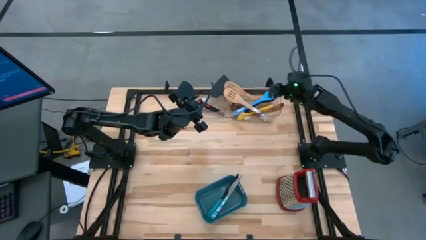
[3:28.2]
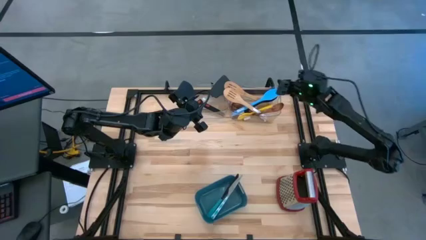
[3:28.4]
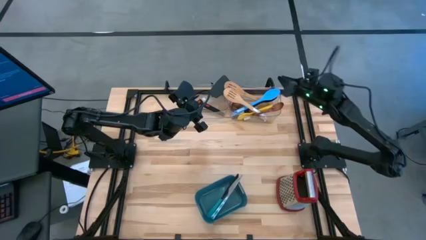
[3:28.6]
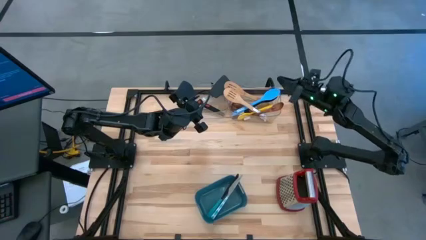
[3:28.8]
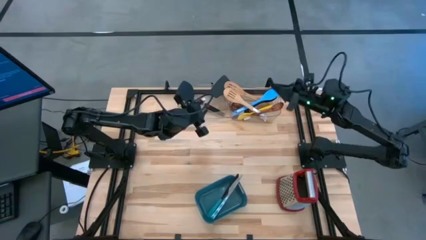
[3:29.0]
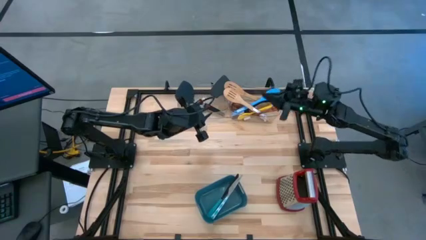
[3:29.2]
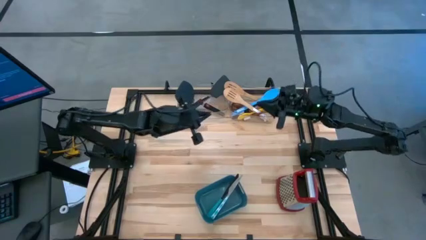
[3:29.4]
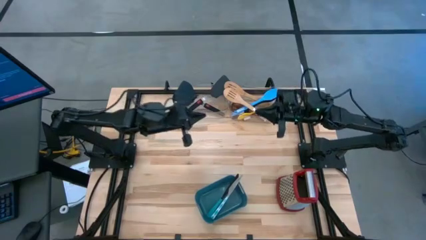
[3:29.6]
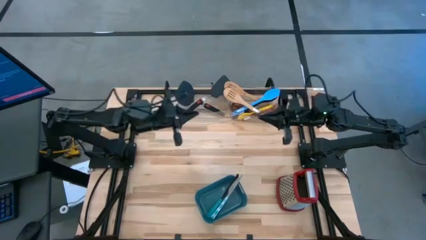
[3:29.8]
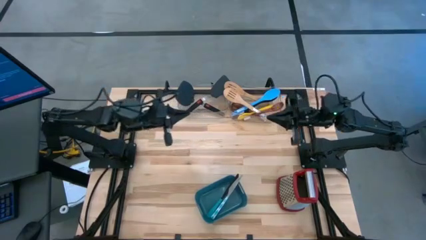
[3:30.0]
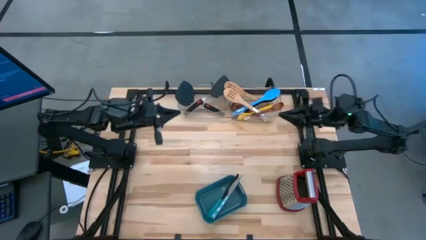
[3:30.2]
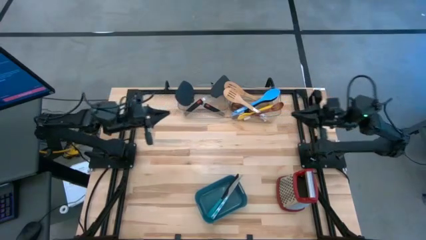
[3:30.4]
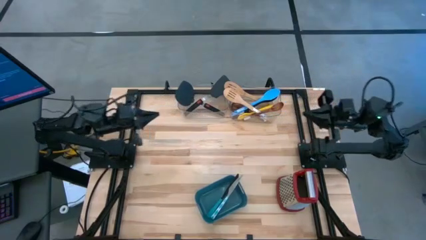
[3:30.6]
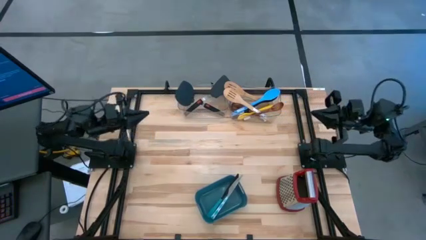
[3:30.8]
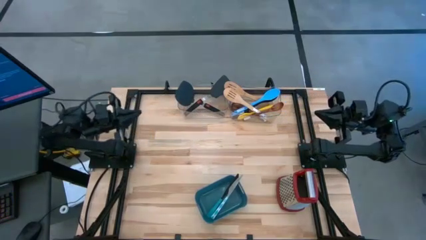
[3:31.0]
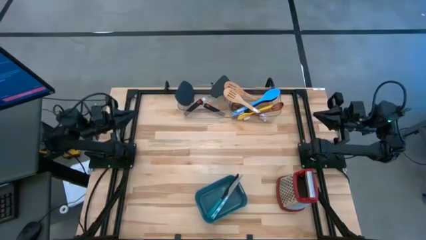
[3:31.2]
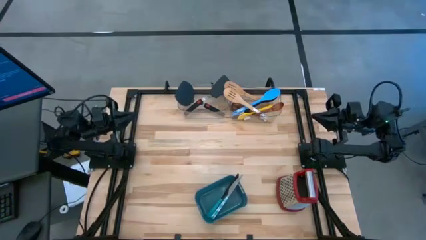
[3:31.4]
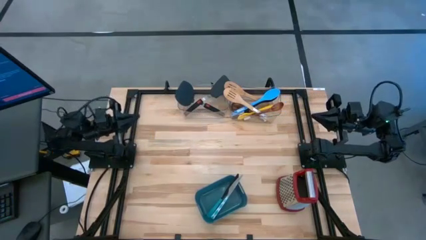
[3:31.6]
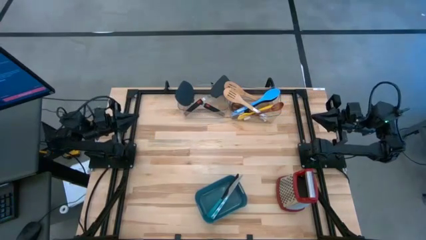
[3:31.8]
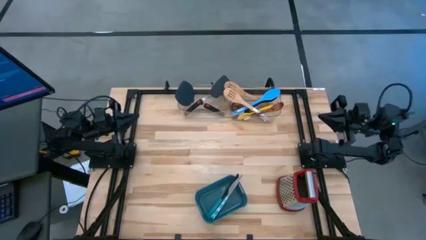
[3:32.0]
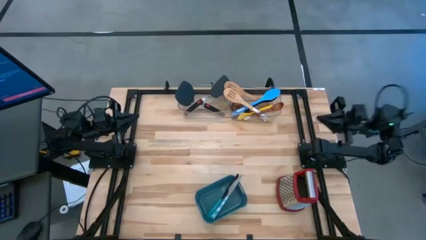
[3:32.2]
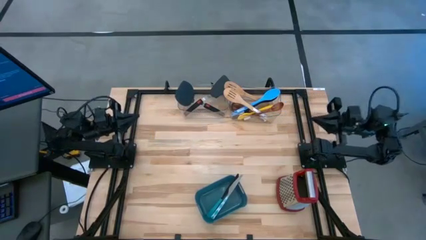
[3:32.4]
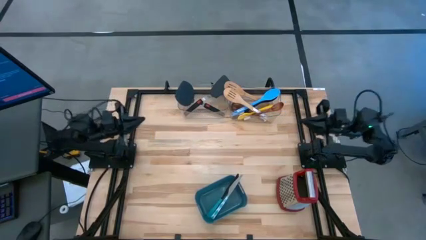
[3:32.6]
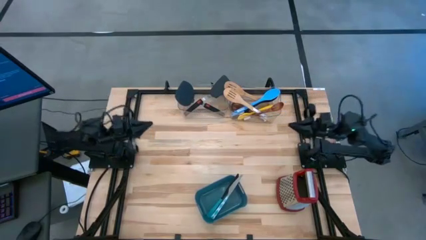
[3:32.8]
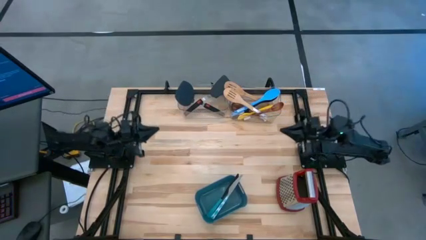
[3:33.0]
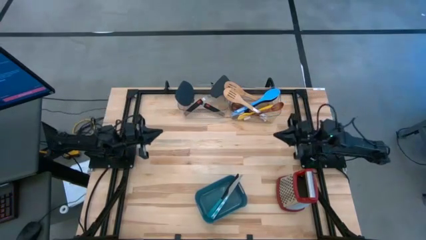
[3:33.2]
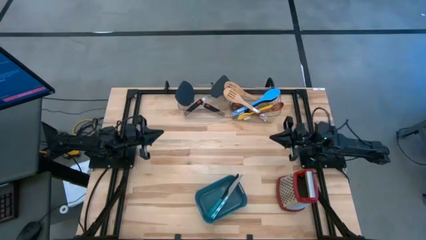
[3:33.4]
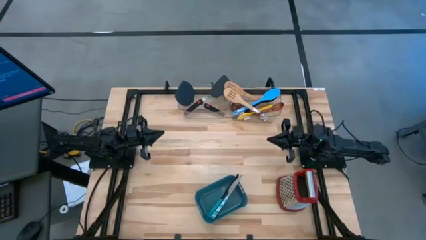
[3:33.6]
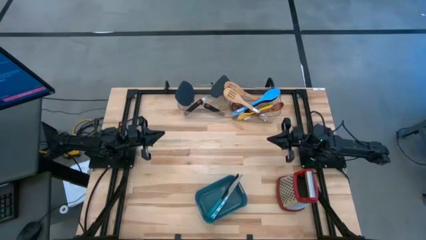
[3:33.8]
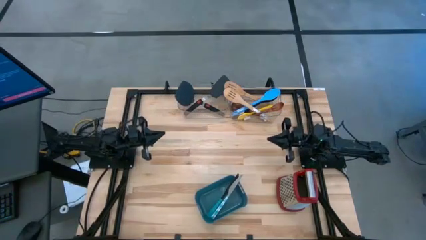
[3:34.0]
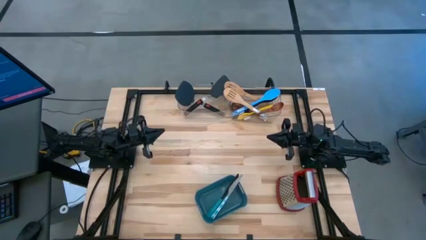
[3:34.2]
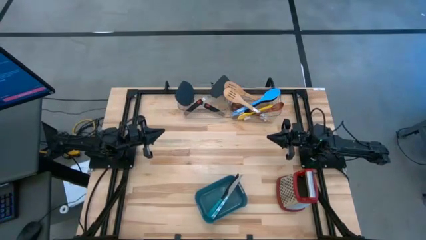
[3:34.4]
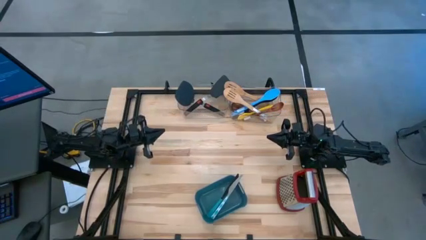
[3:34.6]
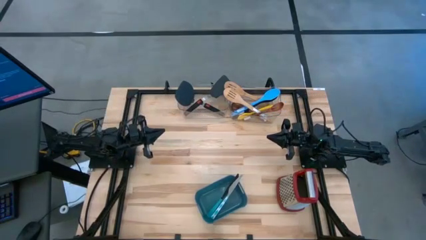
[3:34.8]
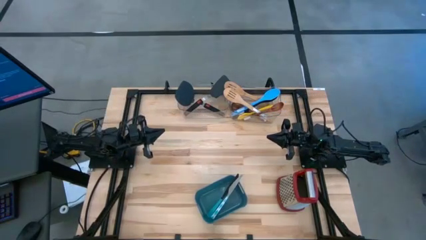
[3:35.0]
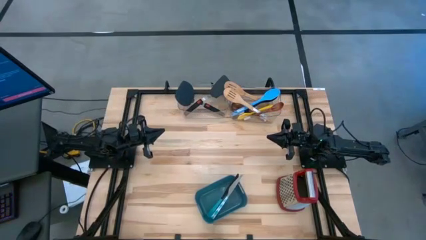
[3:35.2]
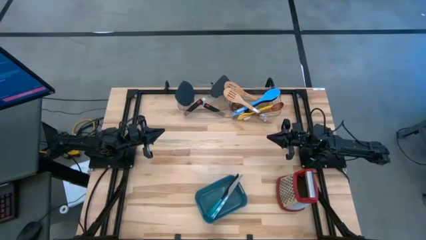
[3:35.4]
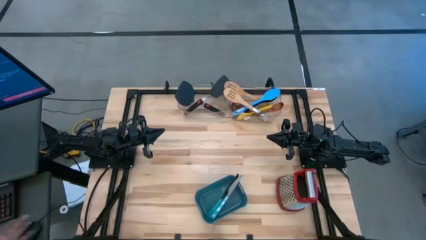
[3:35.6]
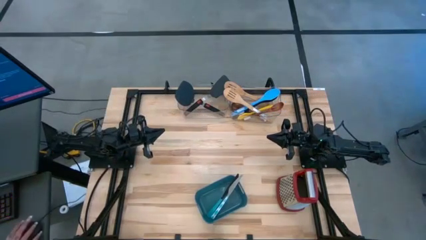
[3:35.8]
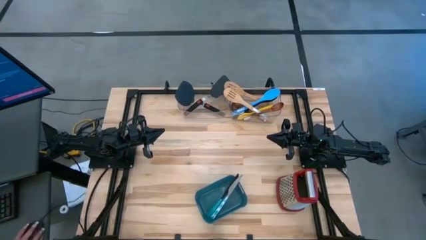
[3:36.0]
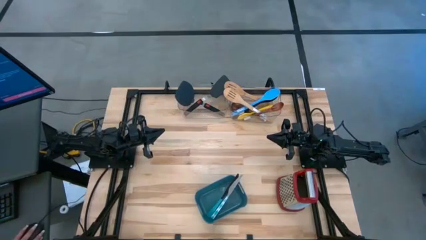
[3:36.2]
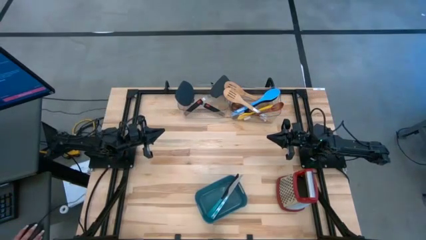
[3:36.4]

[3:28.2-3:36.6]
Task: Pick & Place Kitchen Items
Return to Home Position

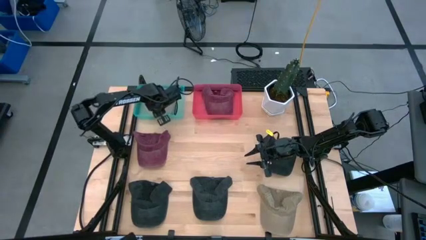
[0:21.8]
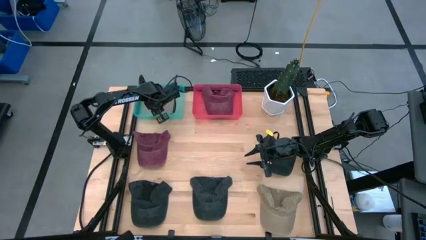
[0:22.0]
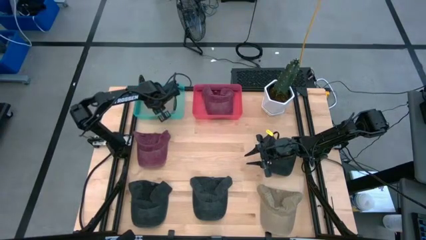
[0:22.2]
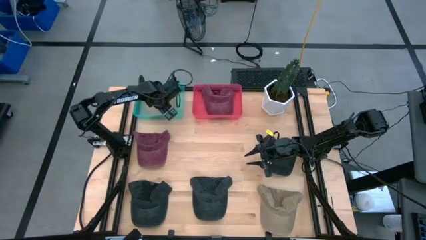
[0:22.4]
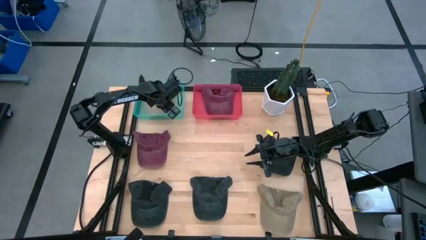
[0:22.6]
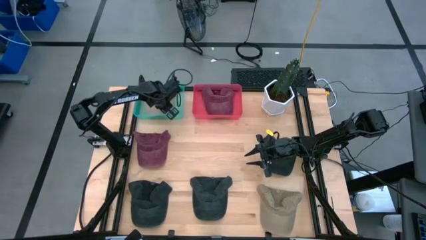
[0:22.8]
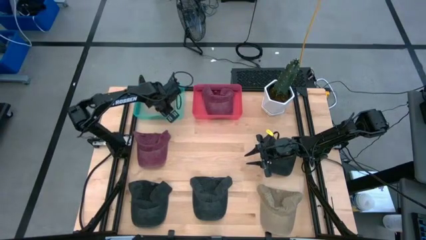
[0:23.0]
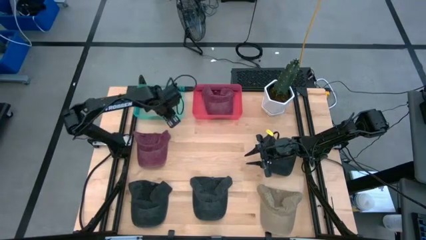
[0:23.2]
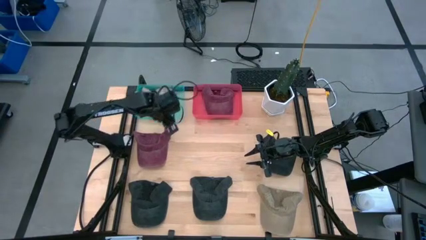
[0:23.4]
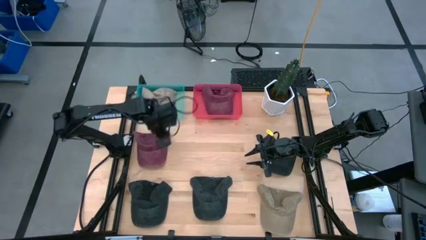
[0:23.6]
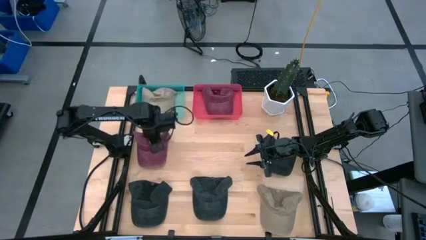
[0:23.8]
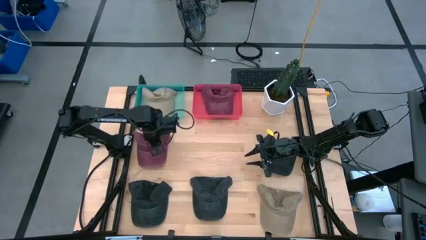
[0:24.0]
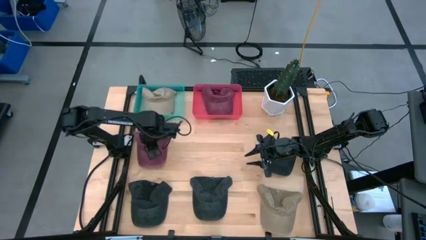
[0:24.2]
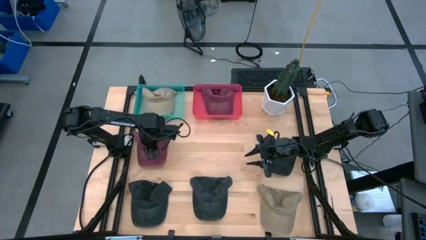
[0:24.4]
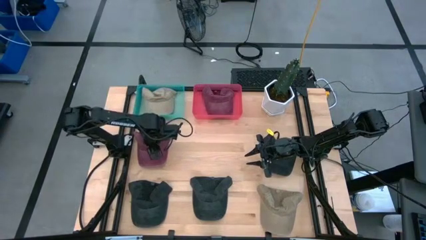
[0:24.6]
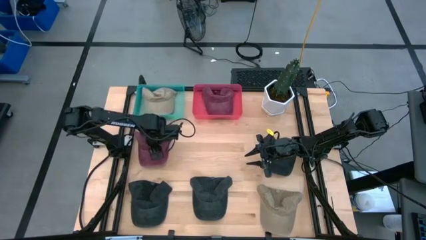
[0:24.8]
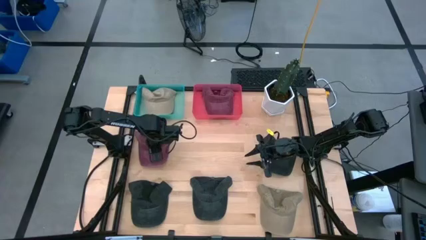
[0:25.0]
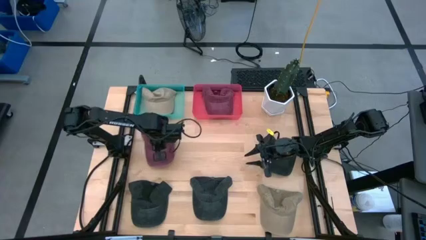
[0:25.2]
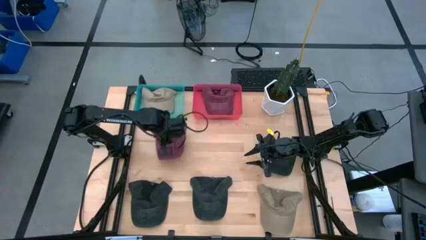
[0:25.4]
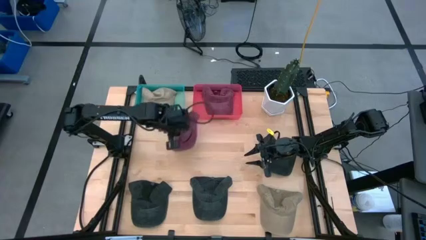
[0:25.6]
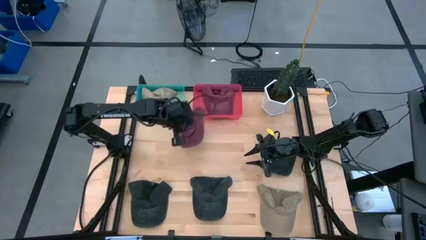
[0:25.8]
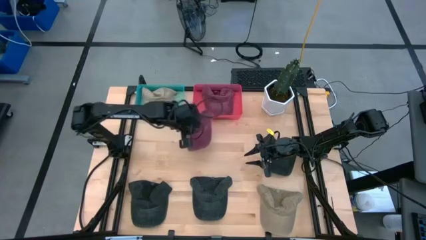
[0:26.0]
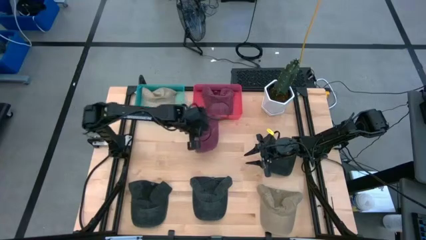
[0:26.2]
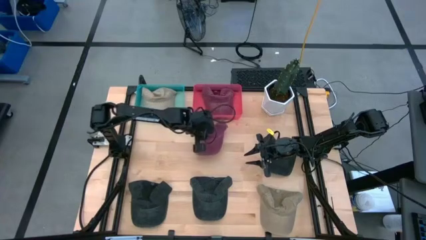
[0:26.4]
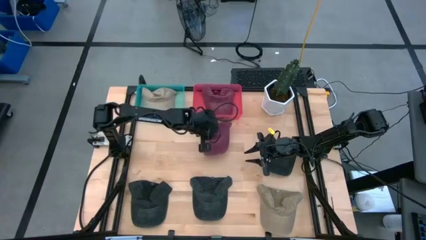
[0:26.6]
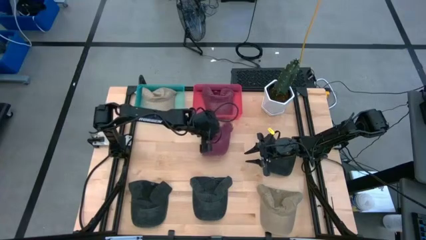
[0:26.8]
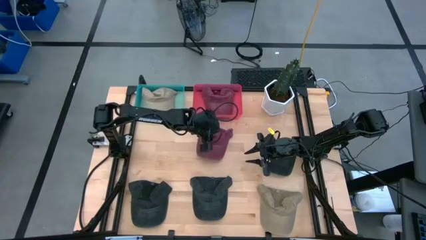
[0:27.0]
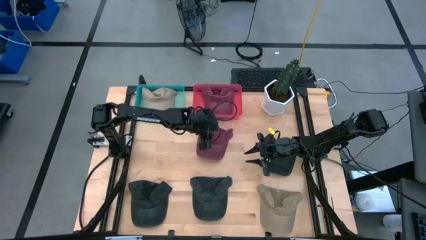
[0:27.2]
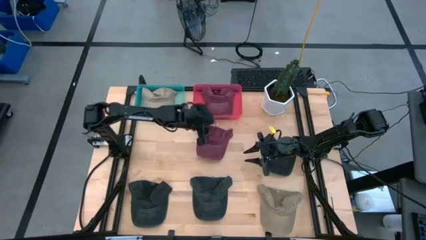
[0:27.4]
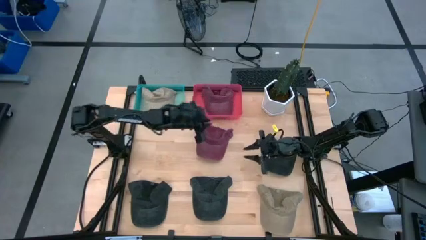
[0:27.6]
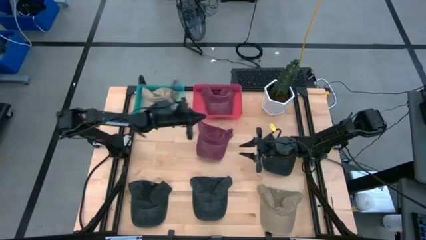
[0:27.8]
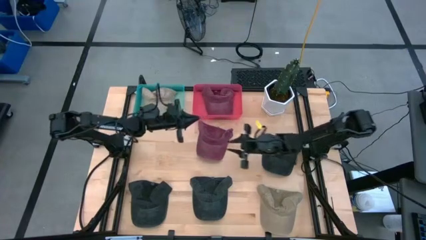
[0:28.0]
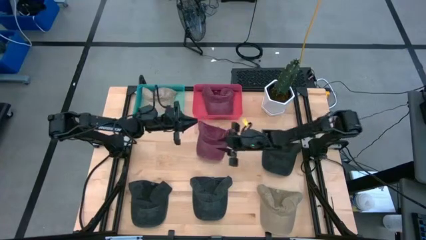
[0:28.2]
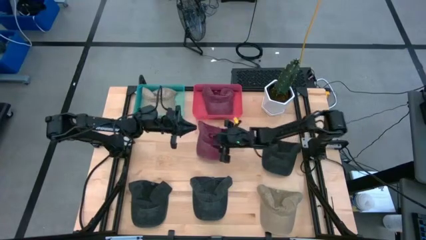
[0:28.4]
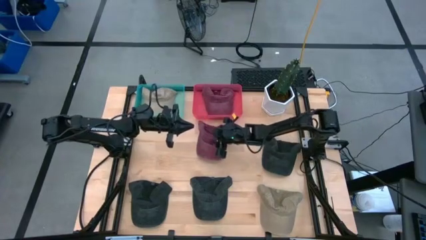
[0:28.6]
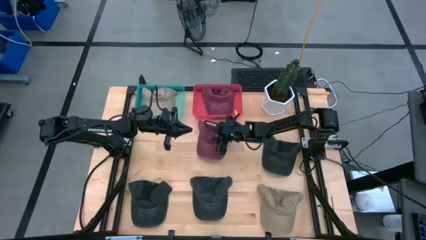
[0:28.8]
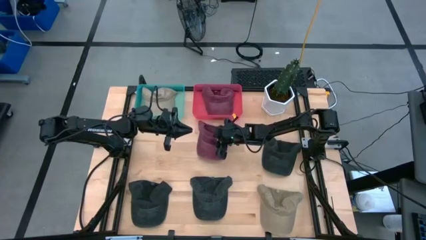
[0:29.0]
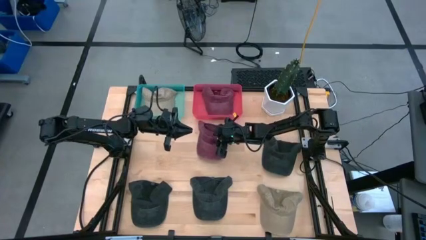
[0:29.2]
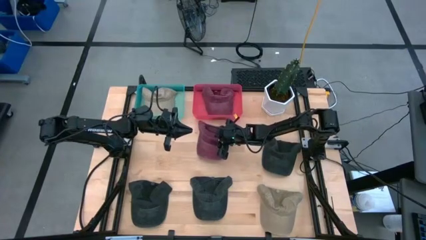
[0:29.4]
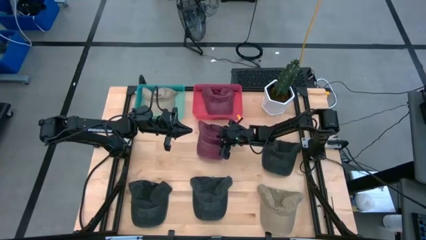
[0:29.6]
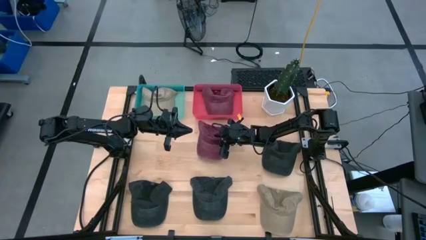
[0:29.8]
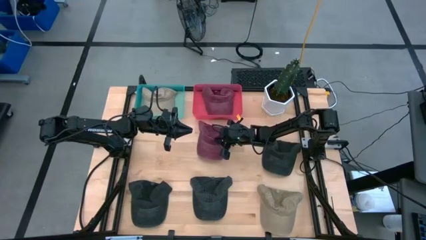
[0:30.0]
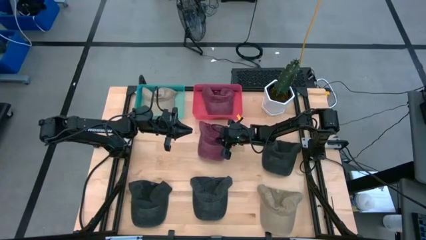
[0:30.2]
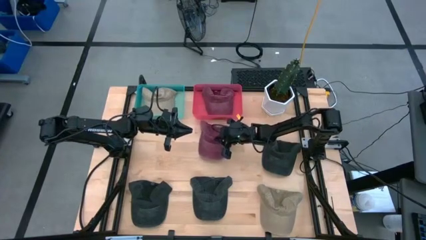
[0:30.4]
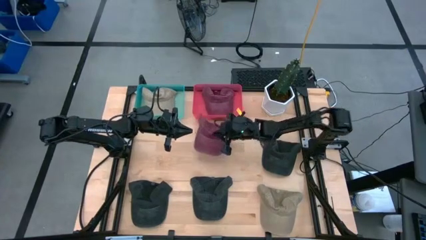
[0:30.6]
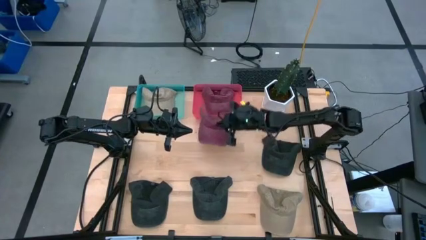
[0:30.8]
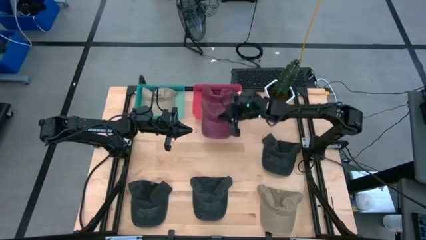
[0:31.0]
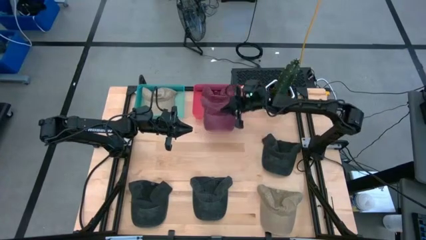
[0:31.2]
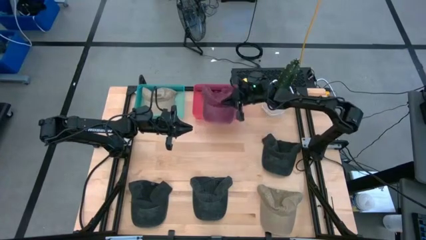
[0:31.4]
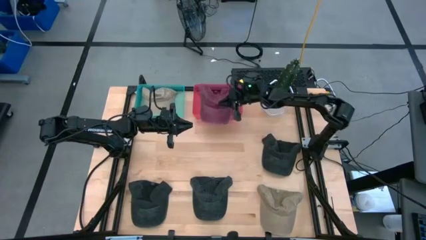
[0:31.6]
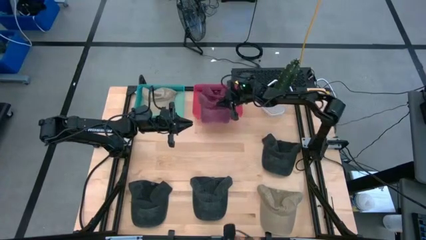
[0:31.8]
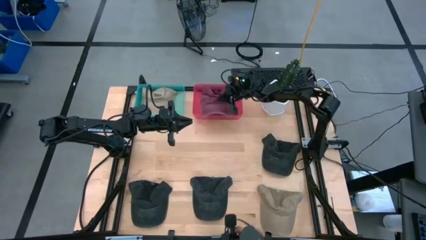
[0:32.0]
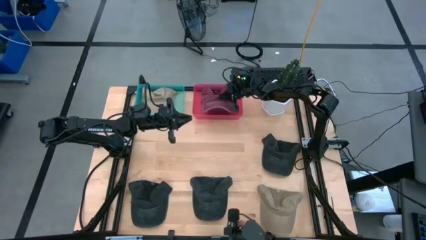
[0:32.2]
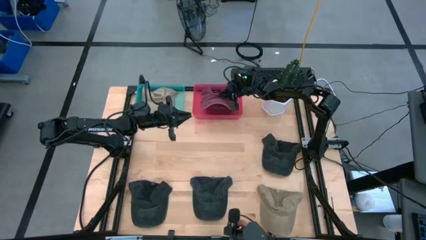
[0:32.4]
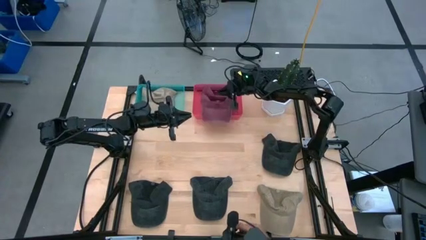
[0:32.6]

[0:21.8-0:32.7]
Task: Pick & Place hat
Put the red cap into the red bin
